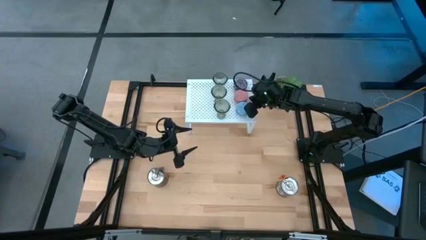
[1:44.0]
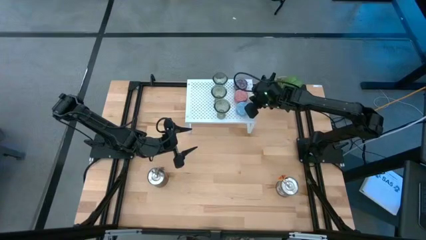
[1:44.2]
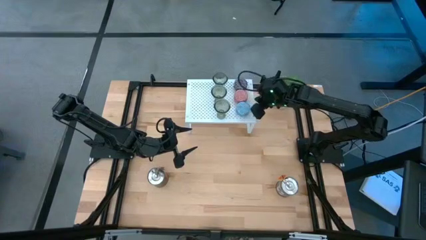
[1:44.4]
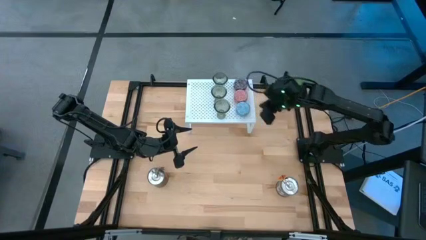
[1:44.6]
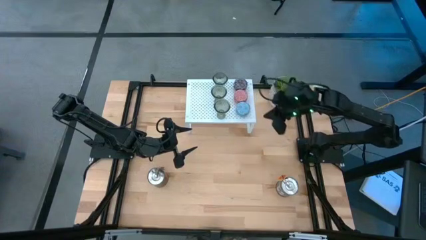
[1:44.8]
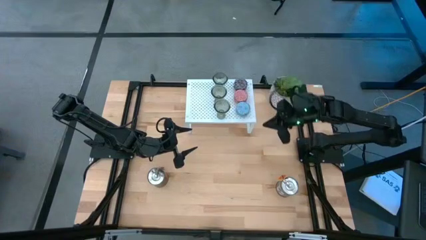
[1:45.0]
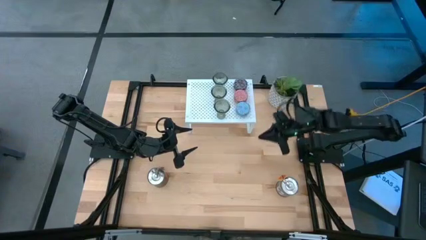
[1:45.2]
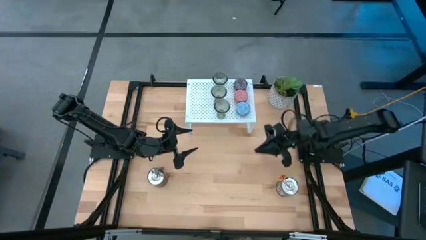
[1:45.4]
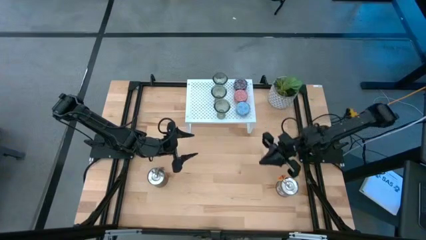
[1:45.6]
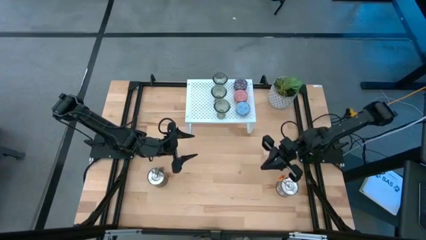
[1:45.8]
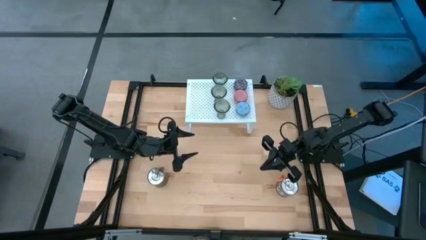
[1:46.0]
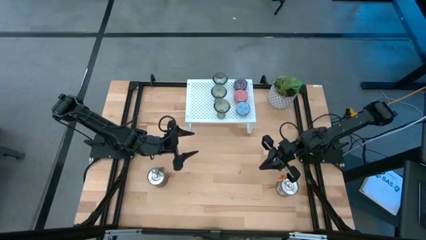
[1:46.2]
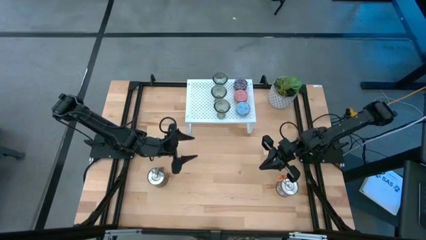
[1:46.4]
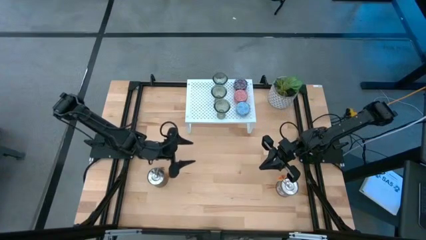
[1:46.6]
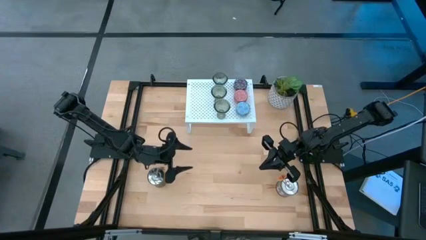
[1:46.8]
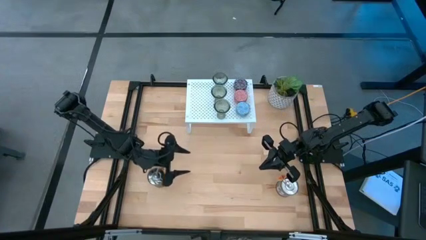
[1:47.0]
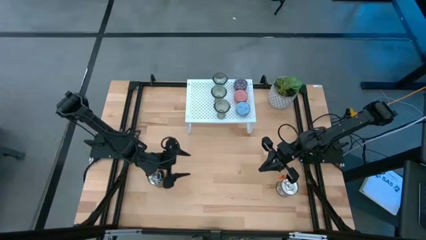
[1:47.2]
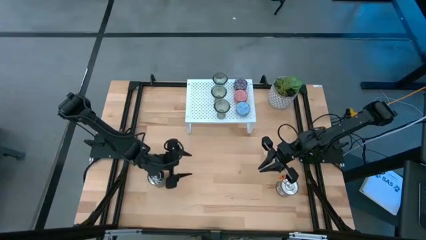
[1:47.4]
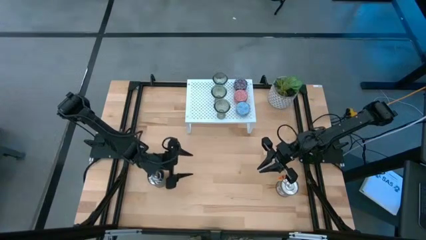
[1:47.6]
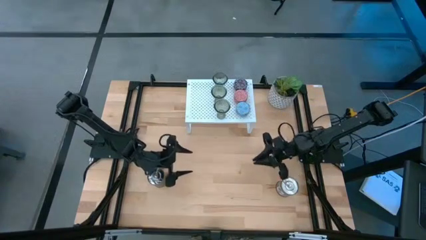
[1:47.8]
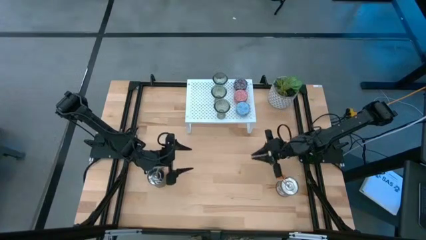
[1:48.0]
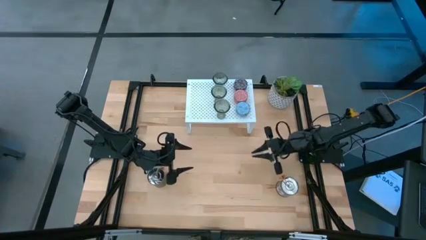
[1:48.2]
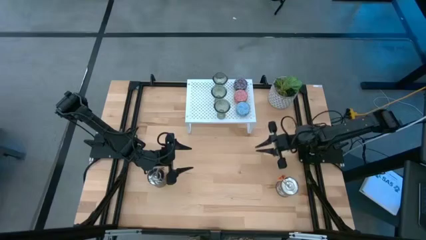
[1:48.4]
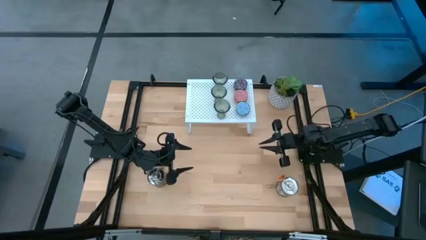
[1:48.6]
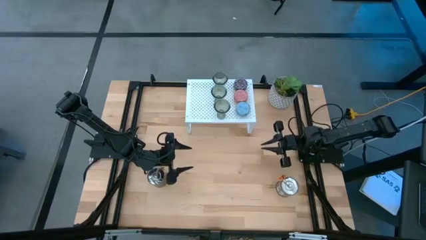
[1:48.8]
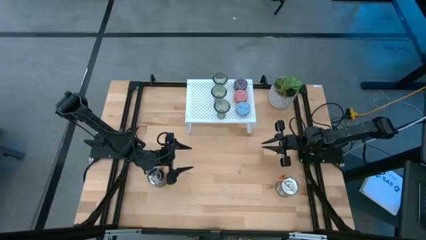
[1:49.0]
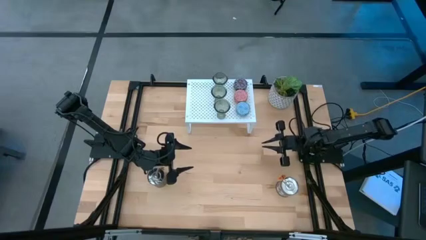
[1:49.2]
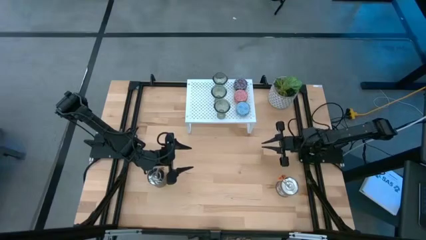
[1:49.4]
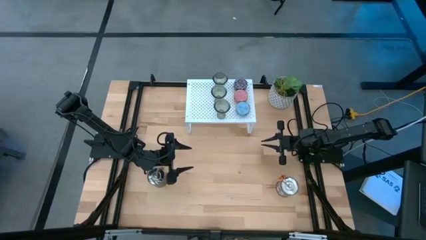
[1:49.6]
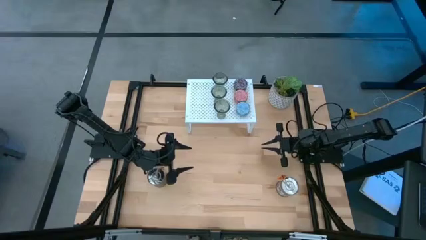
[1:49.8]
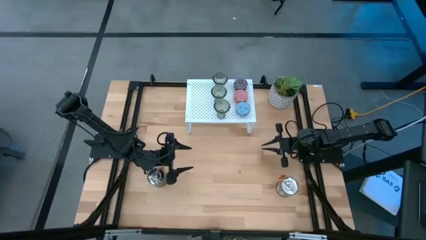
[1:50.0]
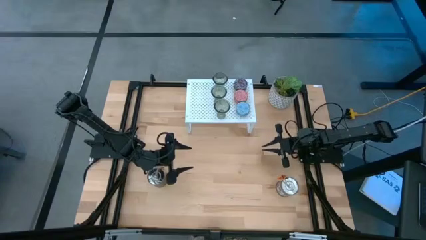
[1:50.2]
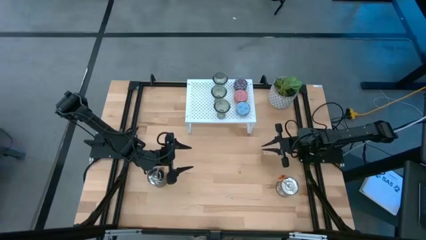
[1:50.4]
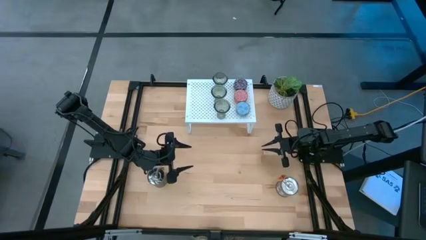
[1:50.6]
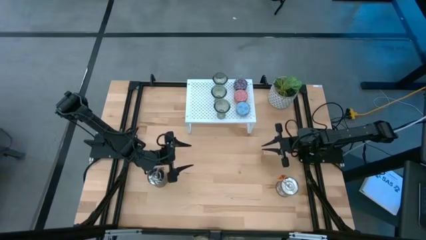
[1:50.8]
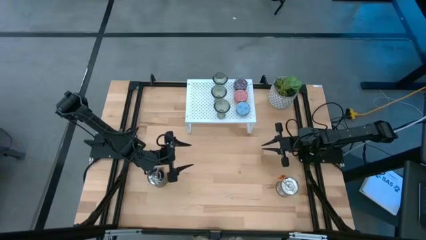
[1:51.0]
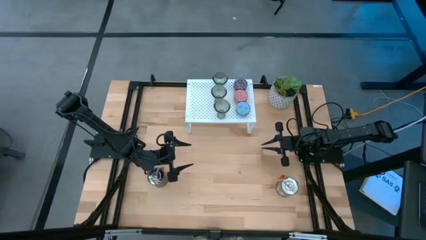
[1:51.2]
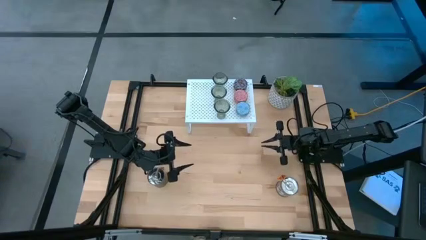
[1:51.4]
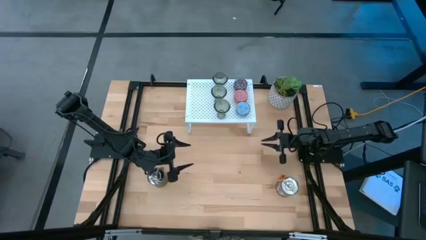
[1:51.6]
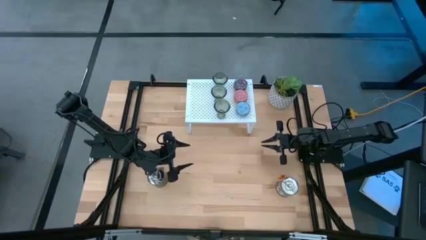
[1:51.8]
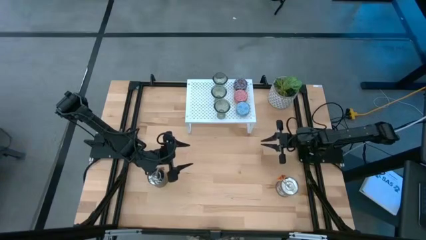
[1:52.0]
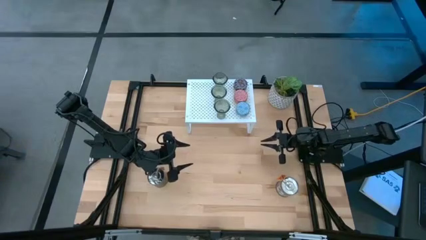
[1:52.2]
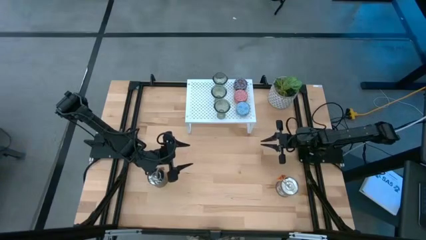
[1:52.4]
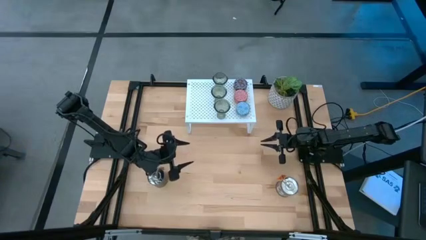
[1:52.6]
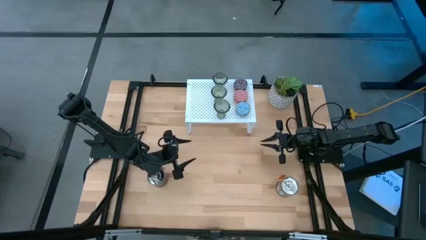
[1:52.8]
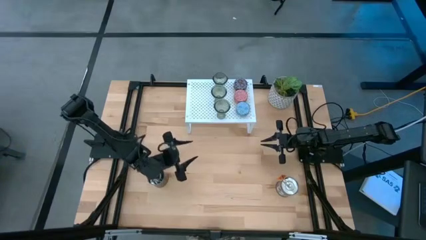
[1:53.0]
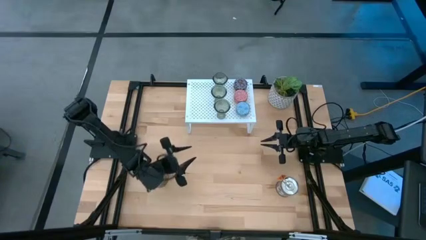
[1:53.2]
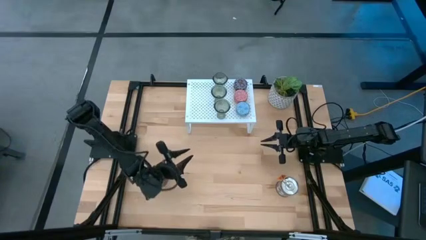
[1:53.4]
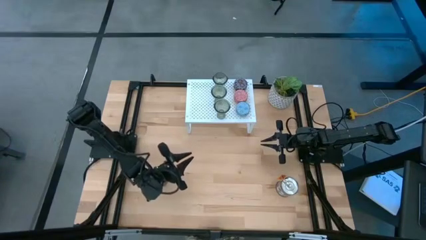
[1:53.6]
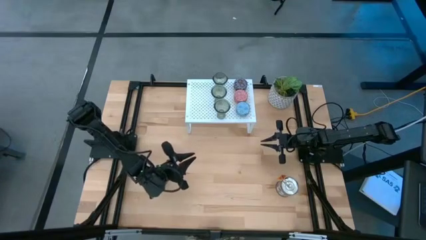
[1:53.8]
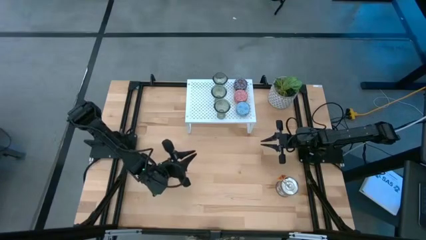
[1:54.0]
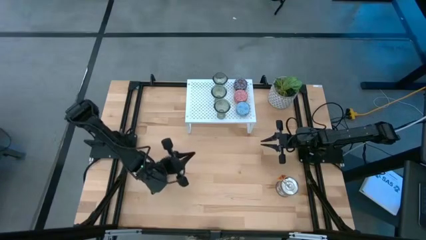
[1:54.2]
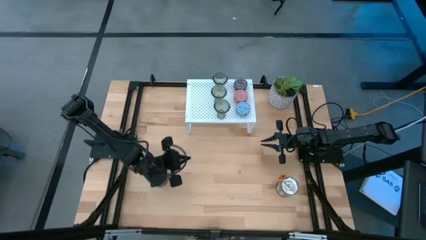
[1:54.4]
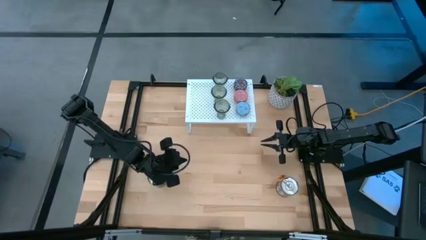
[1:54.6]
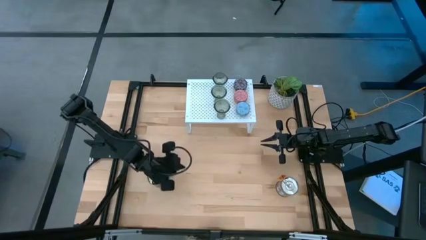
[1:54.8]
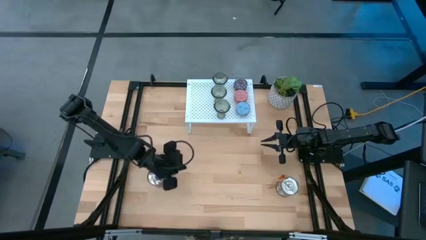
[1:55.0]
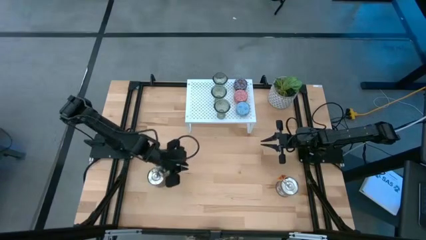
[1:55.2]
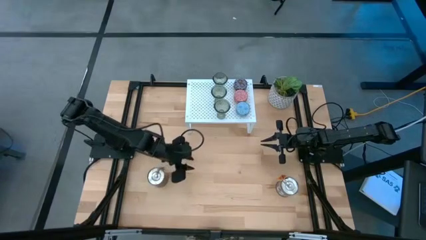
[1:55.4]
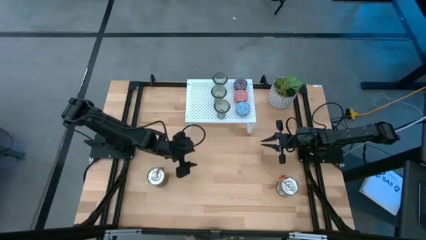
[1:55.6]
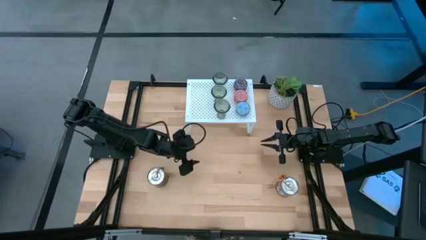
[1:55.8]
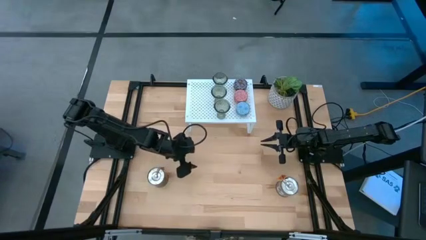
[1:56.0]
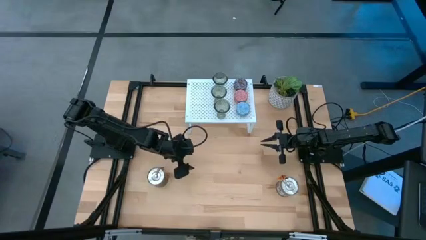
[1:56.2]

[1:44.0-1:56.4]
Task: Pick & Place candle stick holders
Put the left silver scented candle on the shelf
